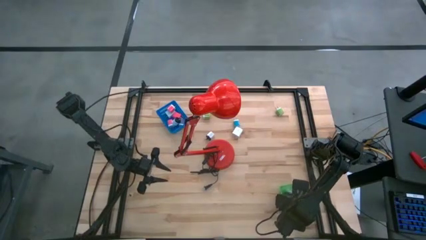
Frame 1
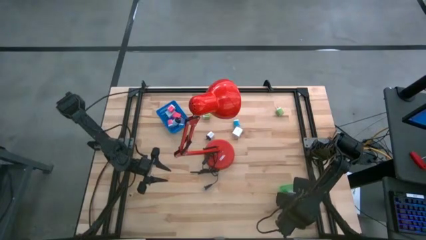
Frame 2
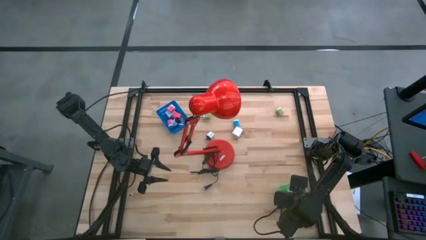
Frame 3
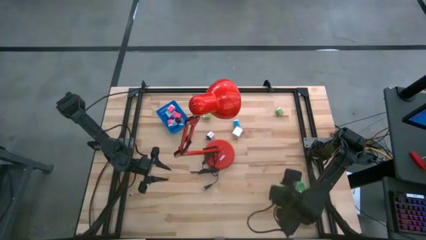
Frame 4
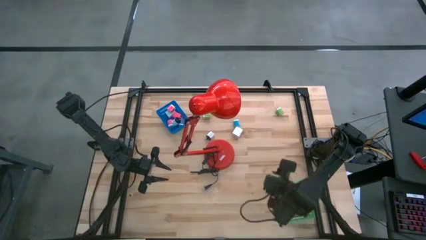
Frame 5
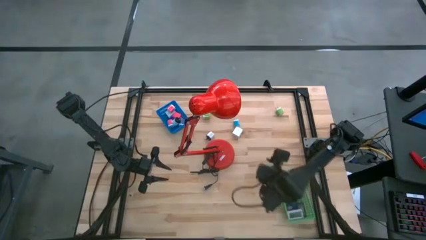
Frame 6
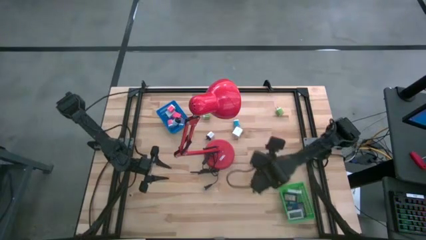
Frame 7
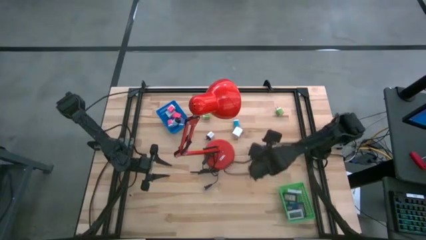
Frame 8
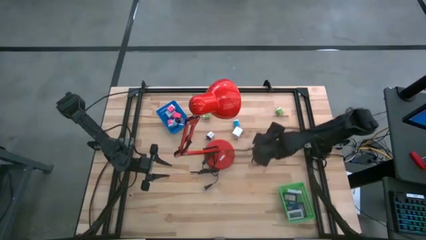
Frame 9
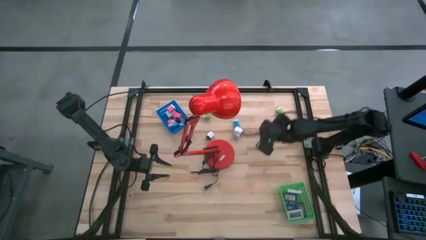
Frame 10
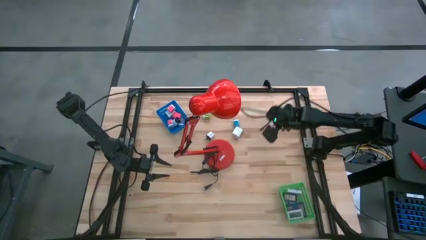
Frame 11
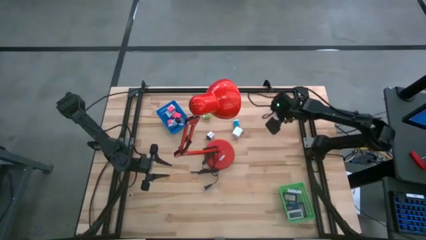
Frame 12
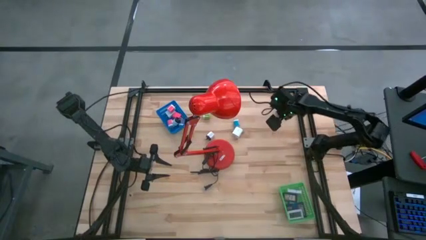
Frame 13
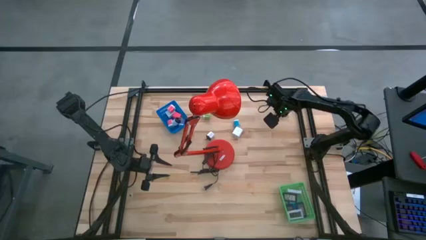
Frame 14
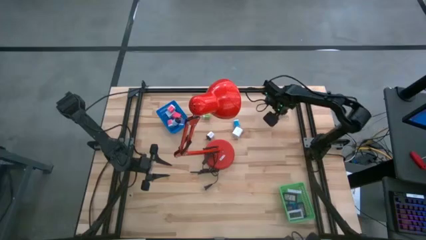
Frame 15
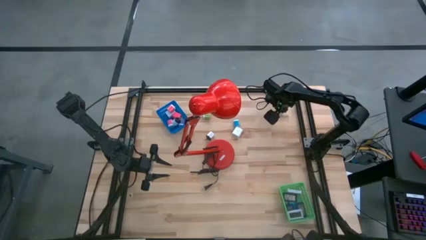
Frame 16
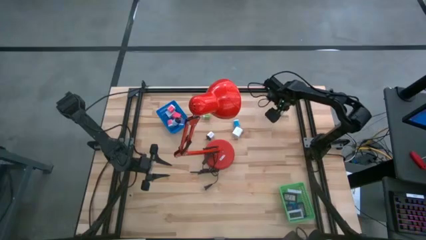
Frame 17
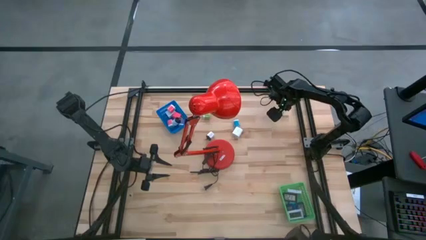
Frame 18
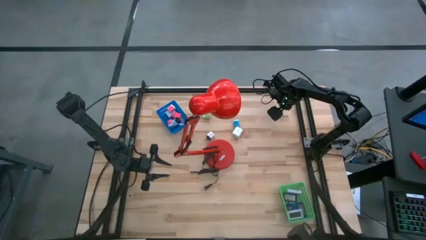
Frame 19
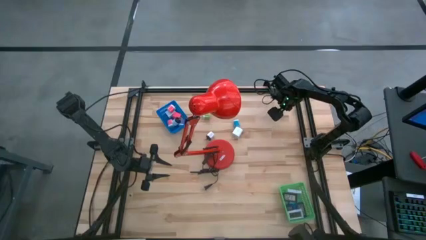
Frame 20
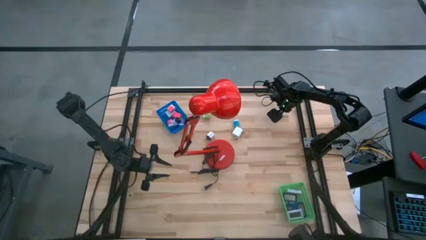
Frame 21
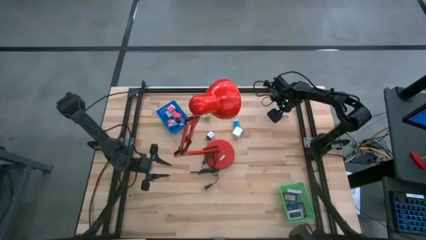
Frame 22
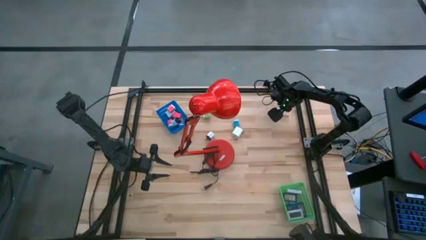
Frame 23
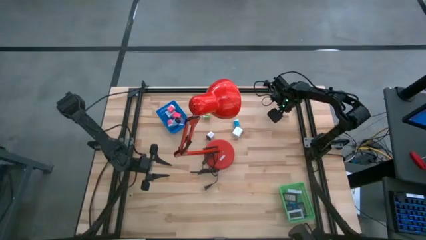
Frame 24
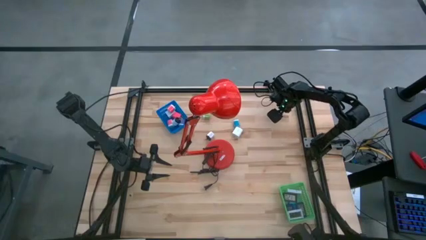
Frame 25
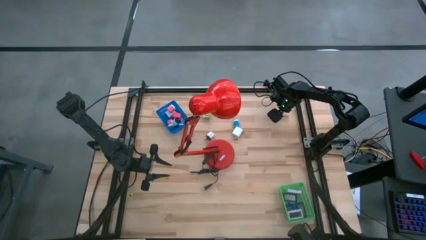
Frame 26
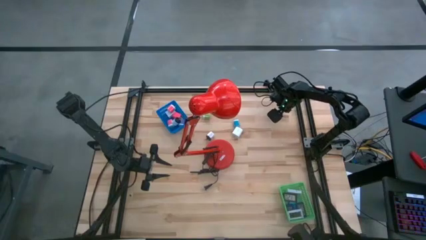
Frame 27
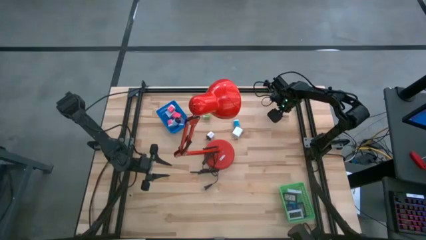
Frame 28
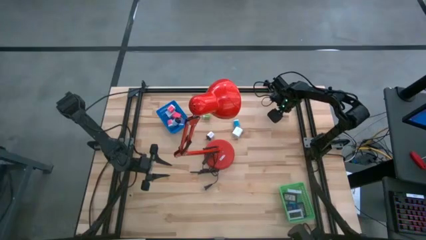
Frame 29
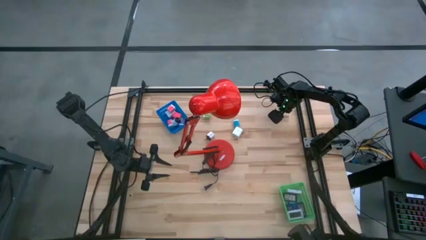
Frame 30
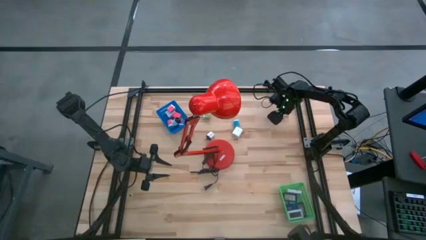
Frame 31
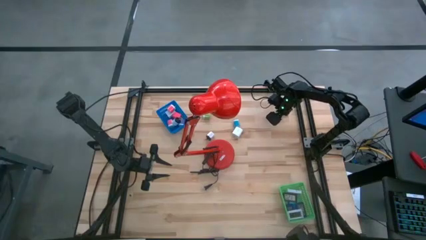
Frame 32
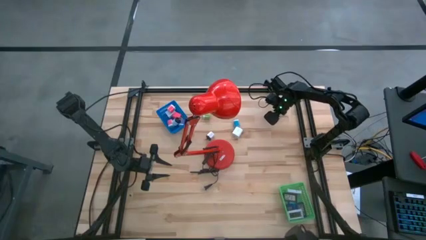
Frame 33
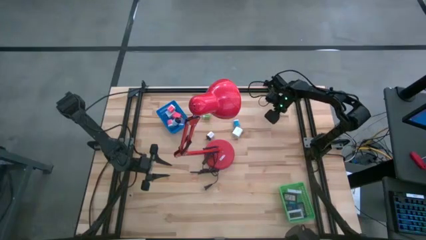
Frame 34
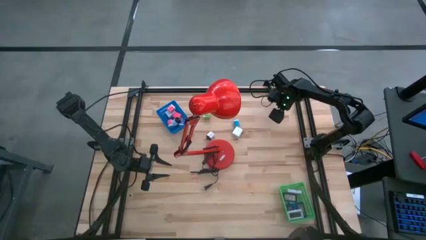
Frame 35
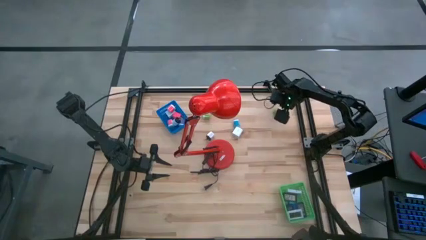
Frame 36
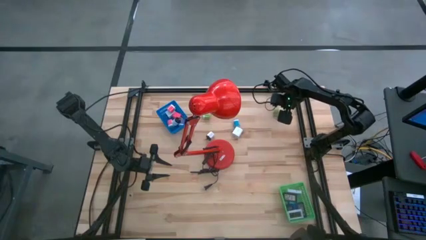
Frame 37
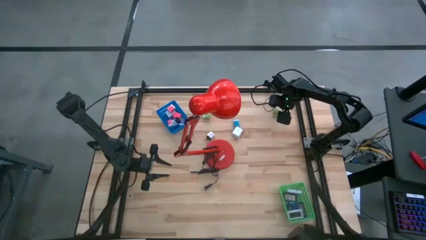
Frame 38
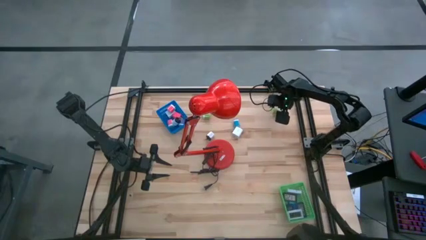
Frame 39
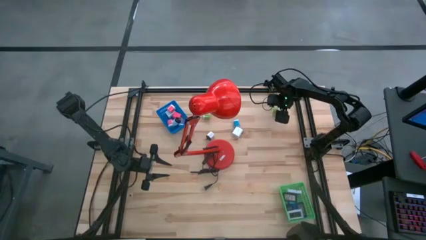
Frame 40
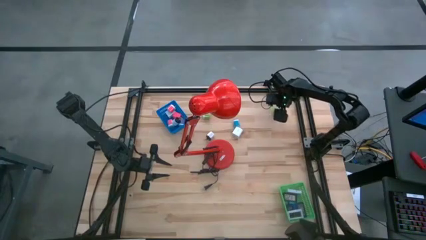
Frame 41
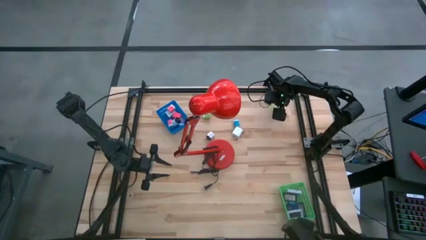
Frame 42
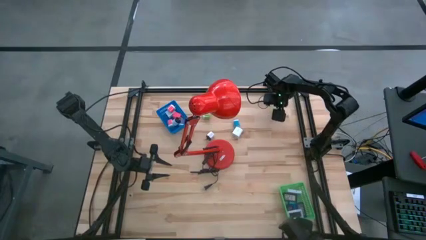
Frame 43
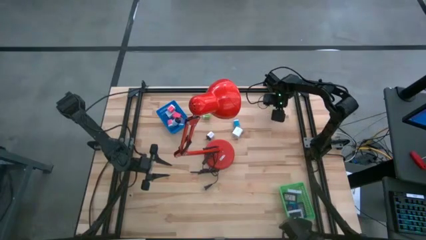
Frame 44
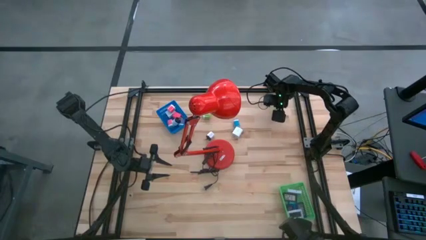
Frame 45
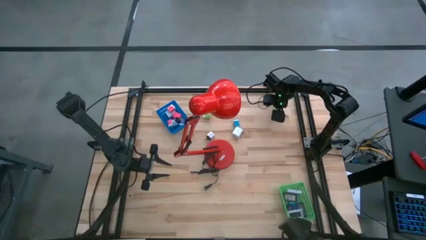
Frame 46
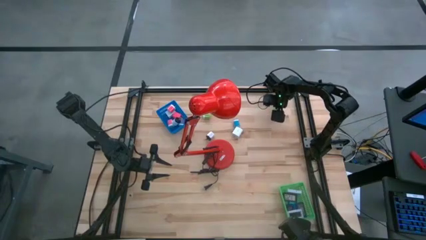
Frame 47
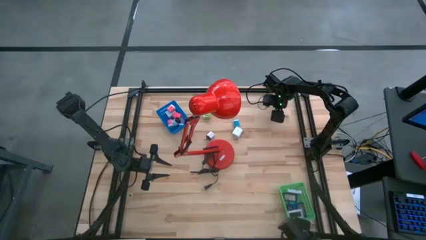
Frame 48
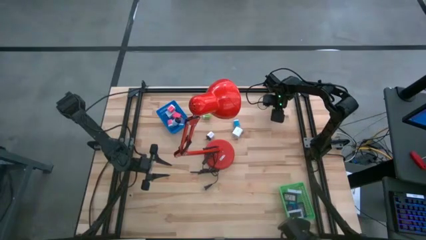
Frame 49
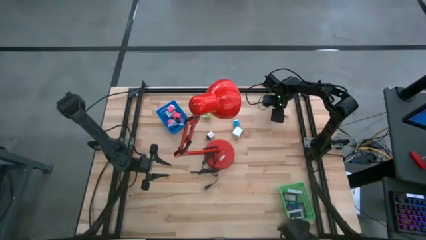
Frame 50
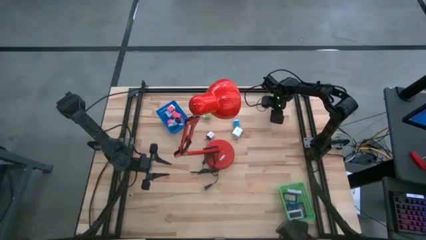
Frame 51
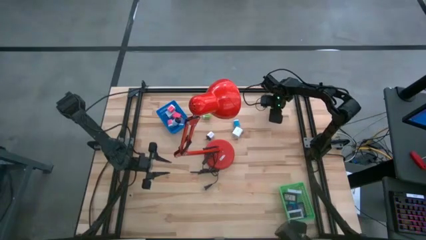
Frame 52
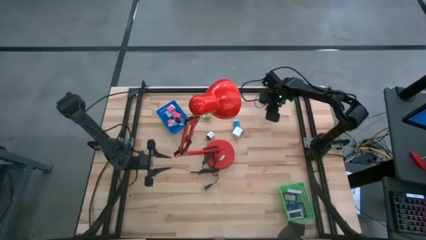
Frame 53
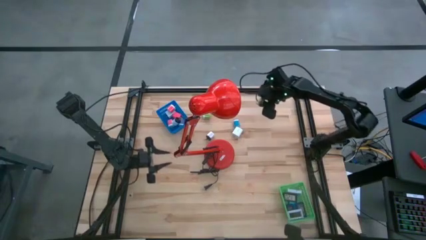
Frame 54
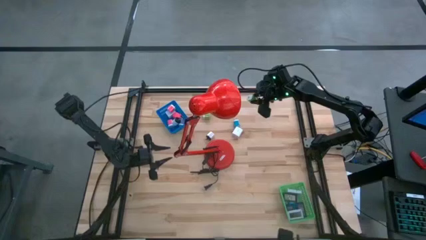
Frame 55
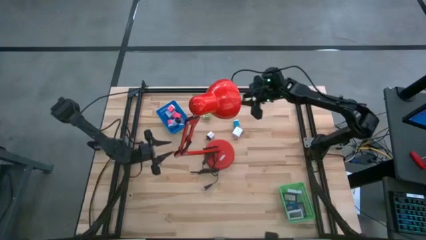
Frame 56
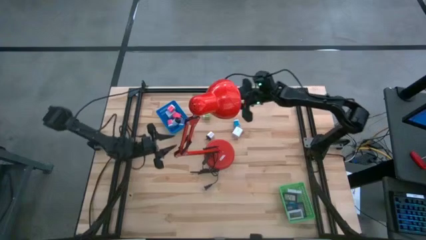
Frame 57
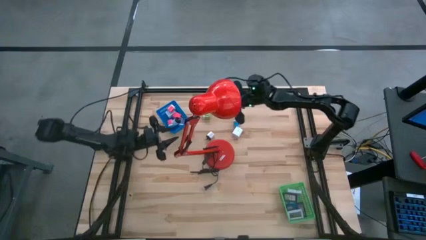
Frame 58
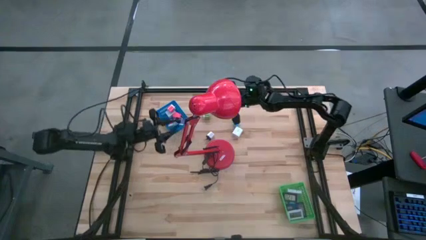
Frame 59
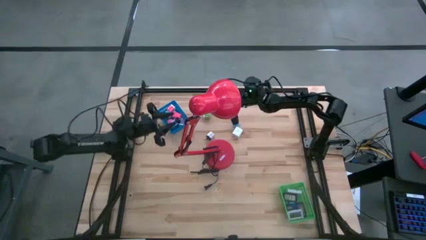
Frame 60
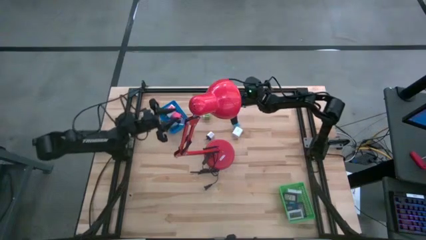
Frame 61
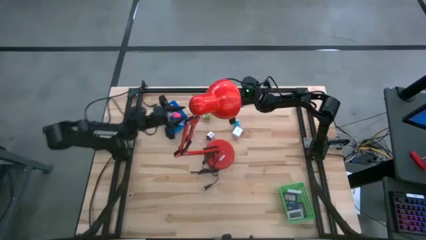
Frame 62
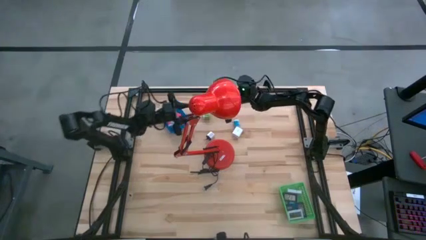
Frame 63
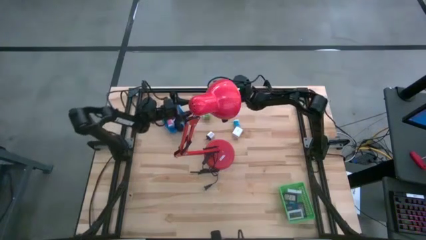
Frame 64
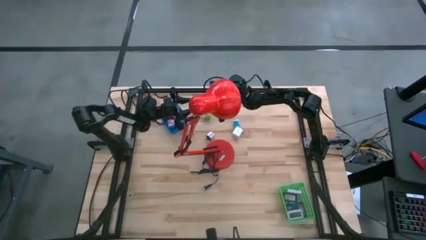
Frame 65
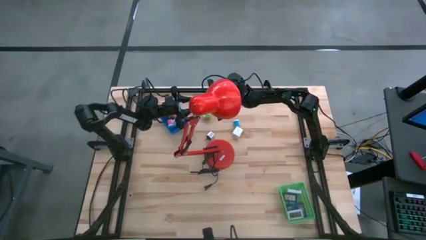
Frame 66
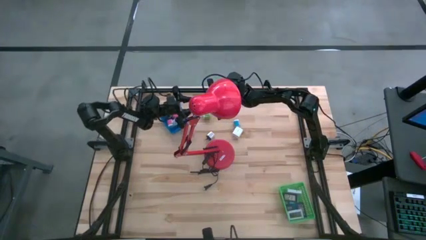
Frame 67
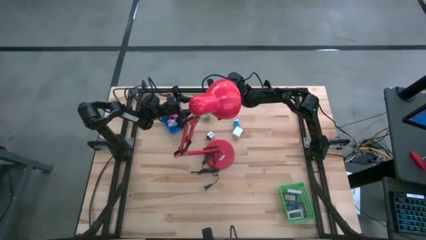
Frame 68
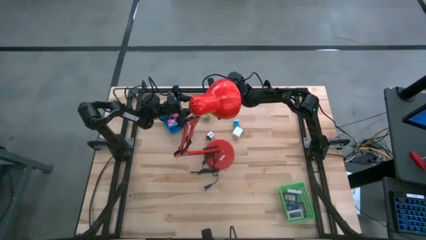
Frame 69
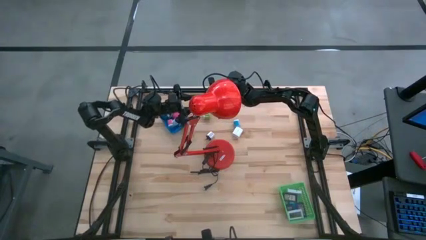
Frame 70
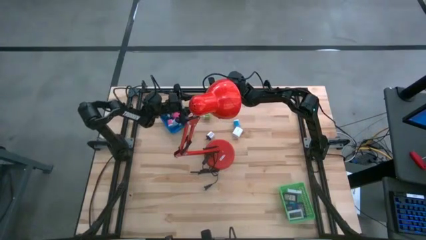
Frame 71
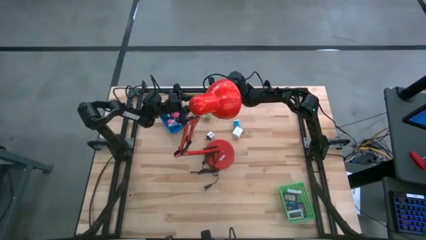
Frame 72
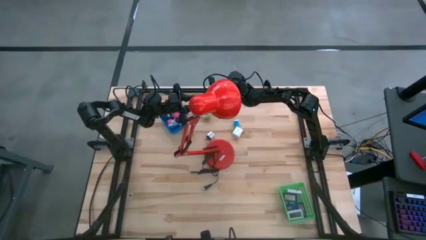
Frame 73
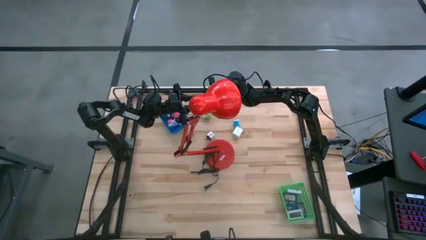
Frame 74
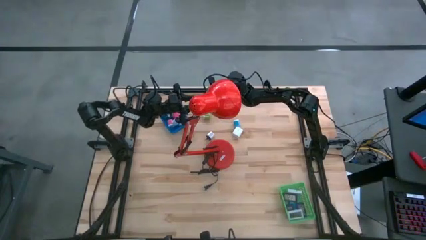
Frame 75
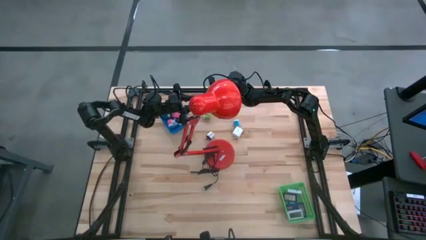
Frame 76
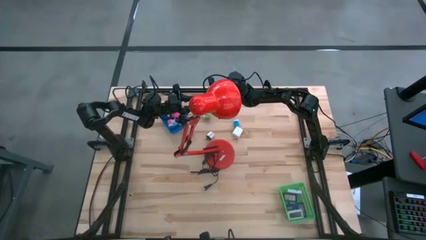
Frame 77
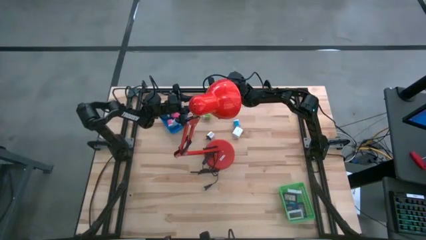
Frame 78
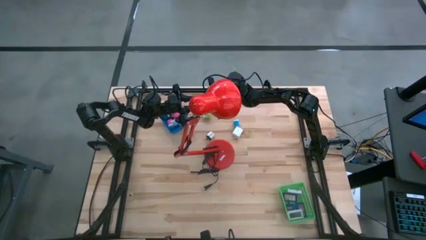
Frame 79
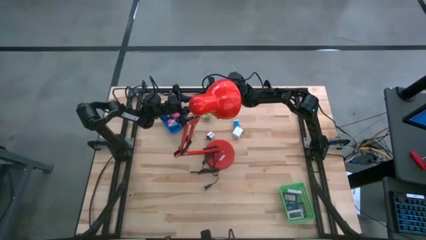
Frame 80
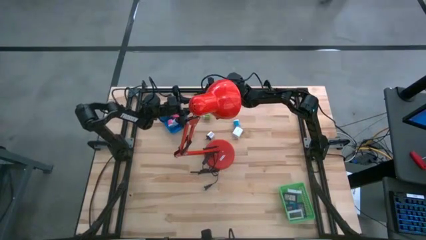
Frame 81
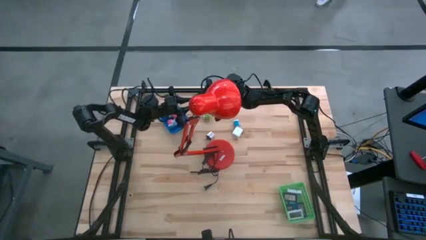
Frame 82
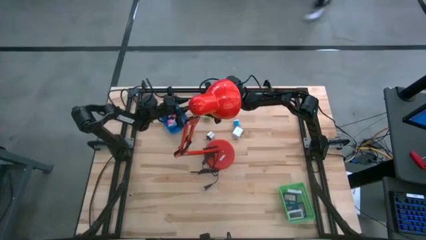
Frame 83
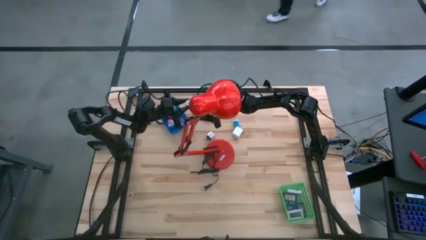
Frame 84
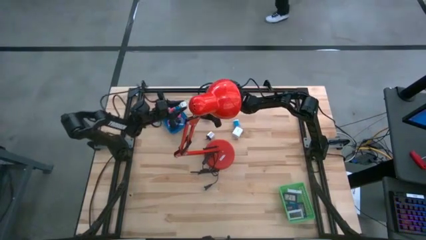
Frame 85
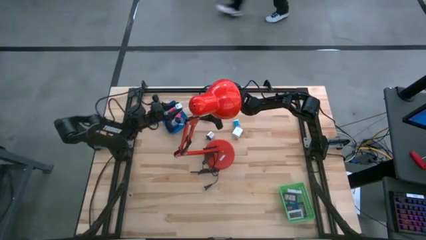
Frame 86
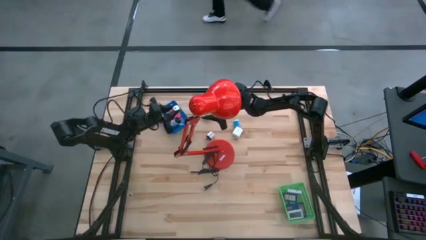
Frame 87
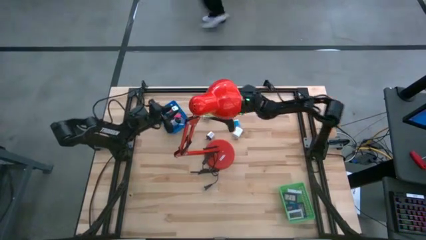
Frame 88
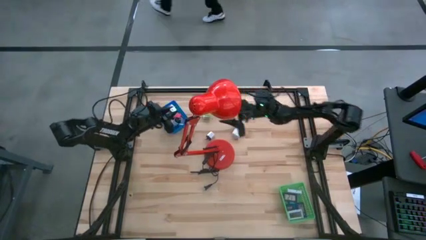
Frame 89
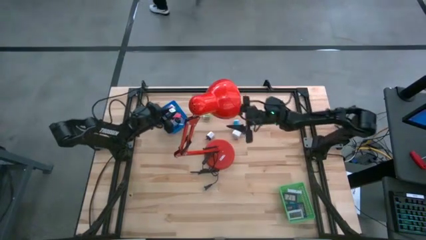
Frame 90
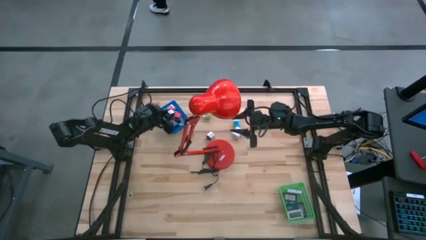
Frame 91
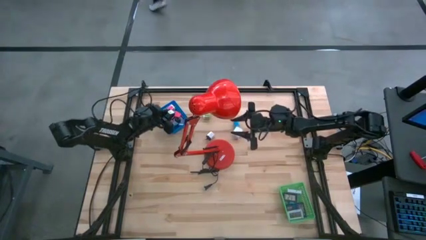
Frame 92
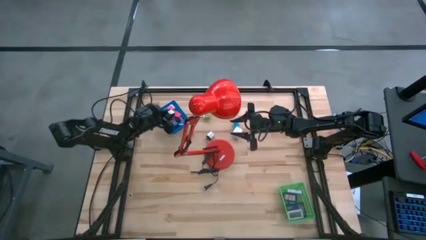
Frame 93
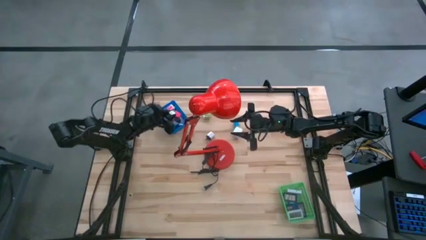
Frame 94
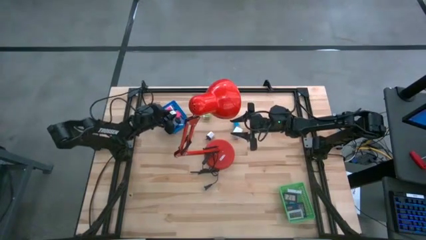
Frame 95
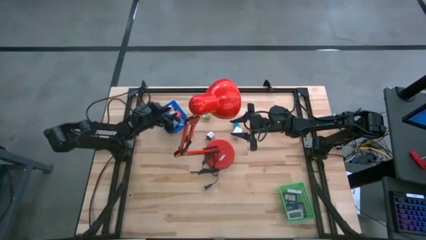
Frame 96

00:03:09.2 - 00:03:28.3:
Task: Pick & Place Office items
Put the right green charger adapter into the blue bin
